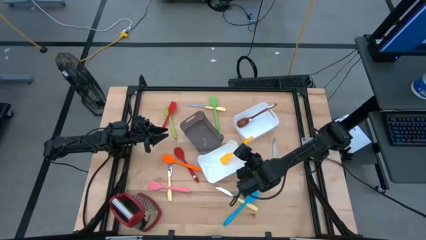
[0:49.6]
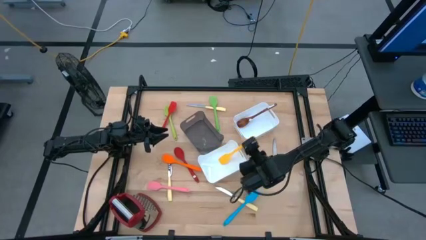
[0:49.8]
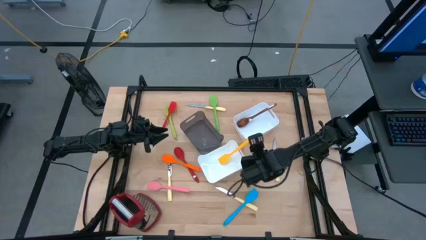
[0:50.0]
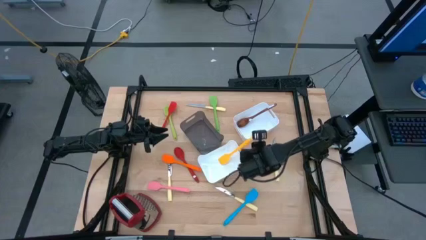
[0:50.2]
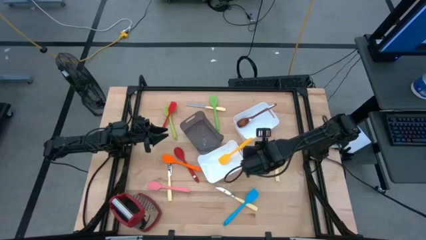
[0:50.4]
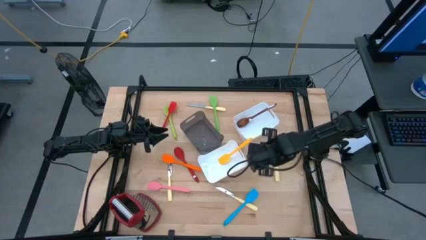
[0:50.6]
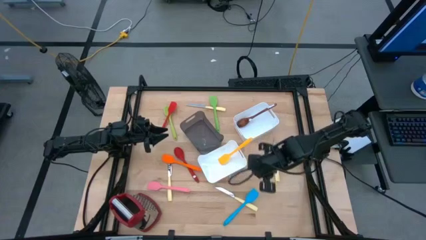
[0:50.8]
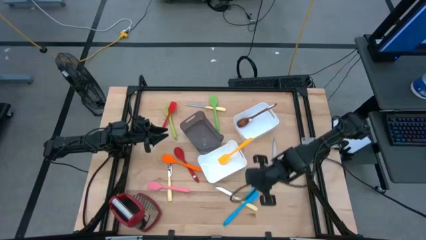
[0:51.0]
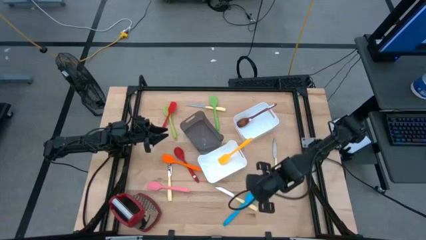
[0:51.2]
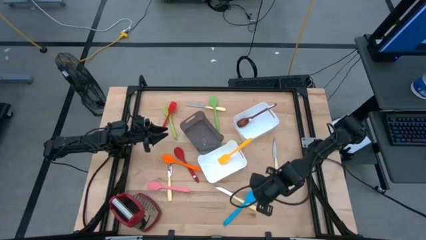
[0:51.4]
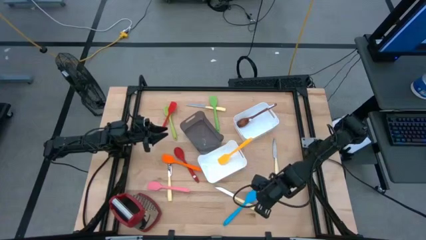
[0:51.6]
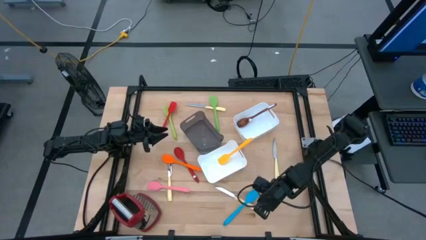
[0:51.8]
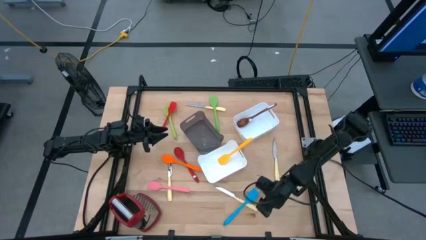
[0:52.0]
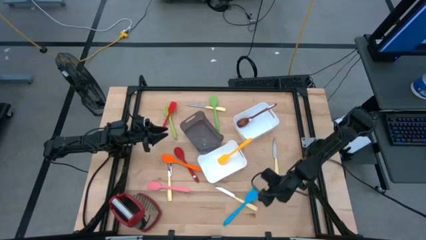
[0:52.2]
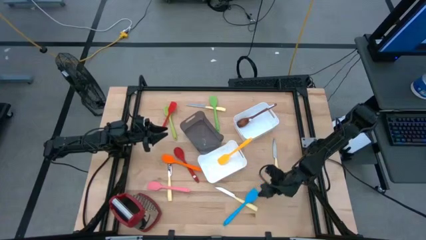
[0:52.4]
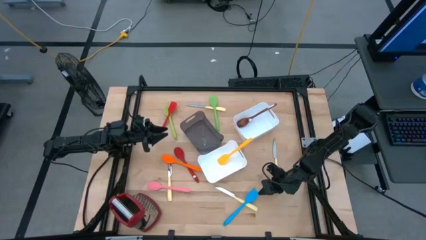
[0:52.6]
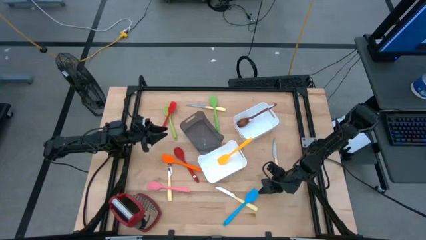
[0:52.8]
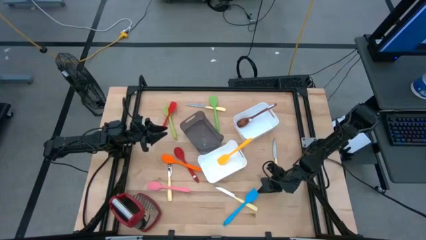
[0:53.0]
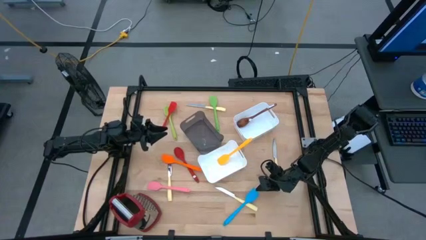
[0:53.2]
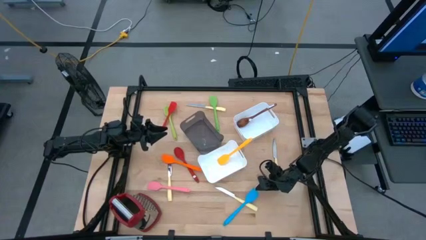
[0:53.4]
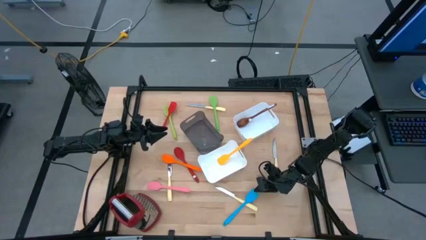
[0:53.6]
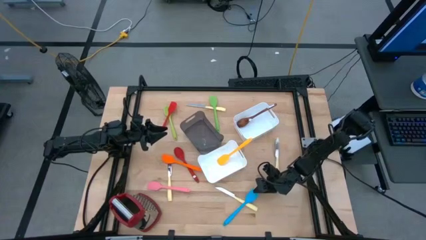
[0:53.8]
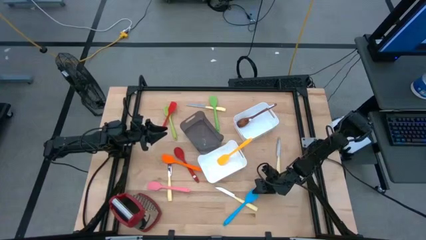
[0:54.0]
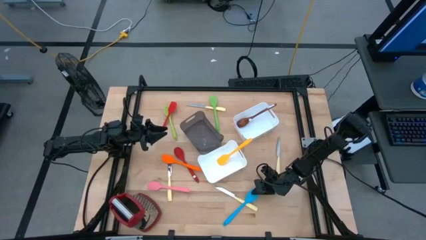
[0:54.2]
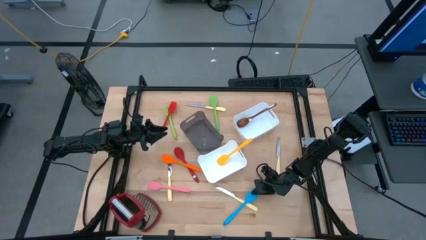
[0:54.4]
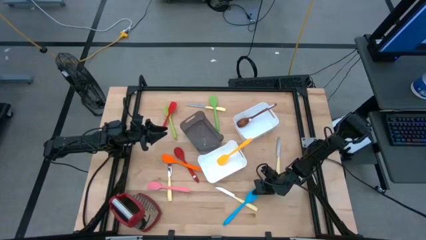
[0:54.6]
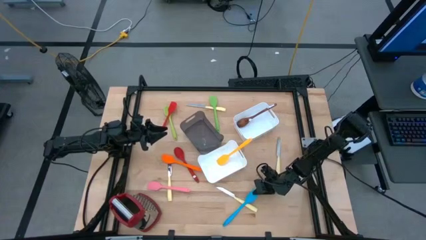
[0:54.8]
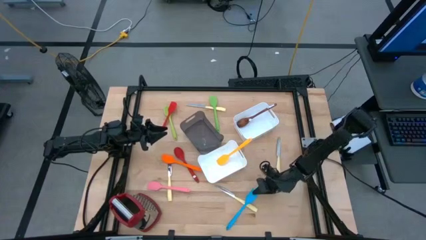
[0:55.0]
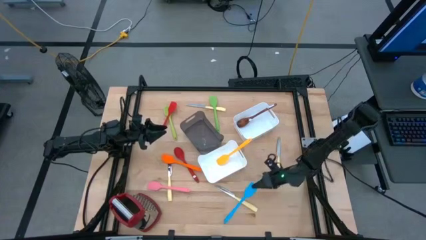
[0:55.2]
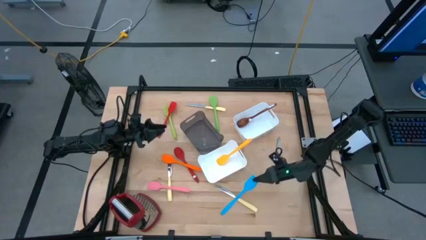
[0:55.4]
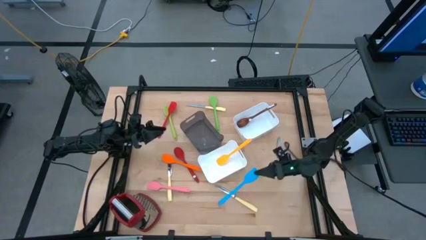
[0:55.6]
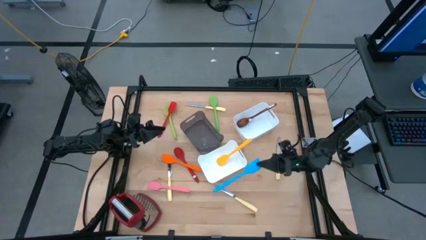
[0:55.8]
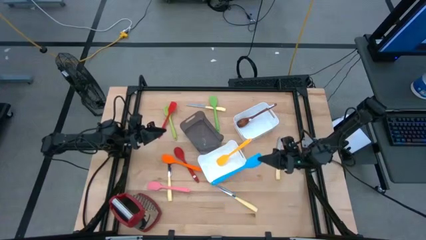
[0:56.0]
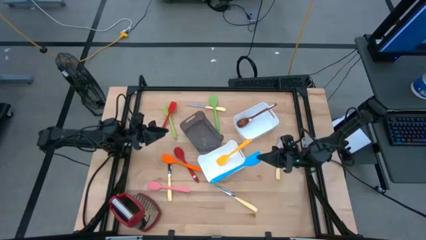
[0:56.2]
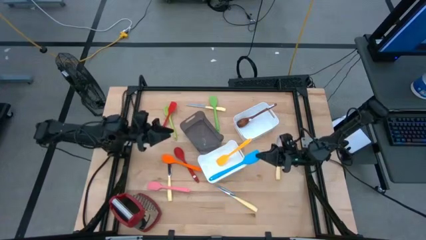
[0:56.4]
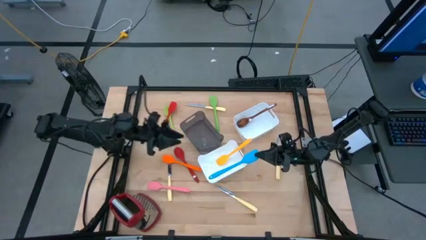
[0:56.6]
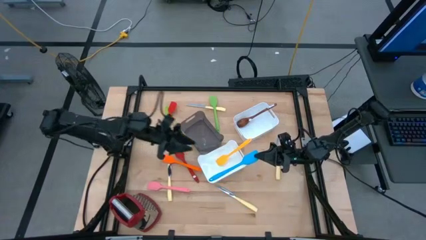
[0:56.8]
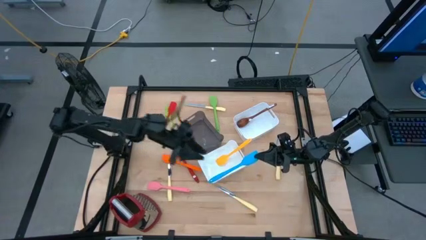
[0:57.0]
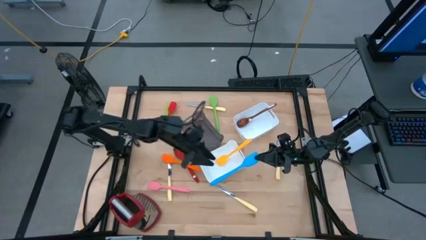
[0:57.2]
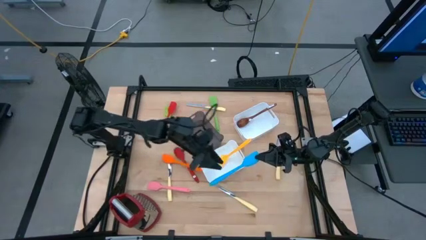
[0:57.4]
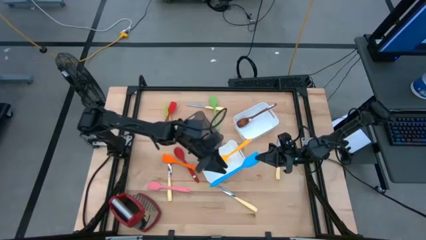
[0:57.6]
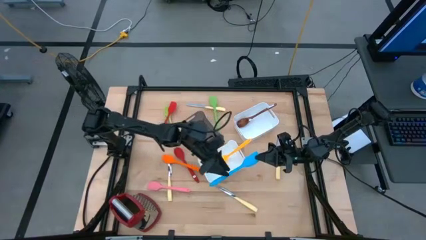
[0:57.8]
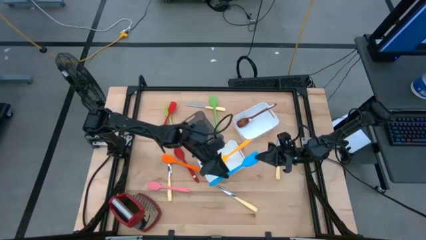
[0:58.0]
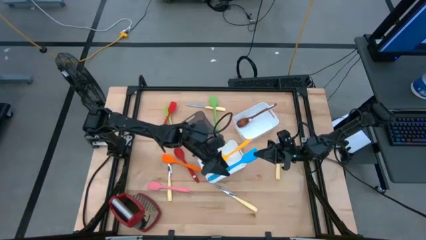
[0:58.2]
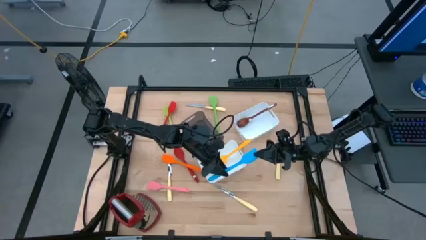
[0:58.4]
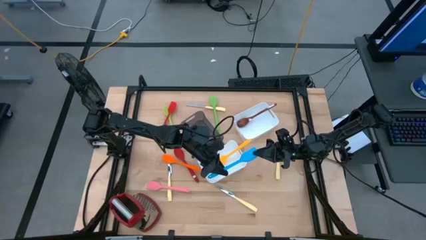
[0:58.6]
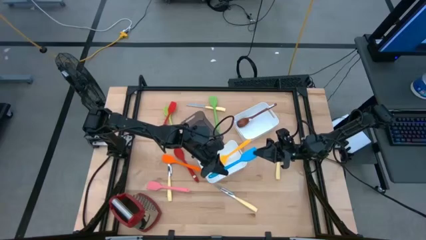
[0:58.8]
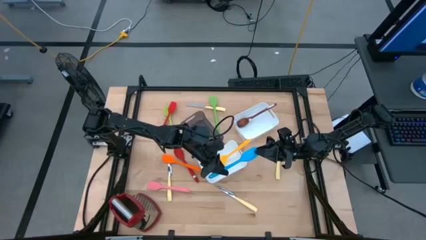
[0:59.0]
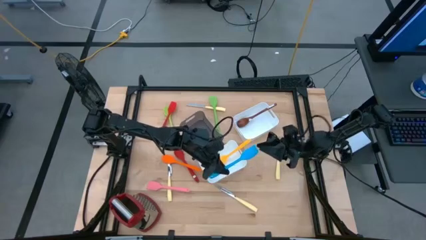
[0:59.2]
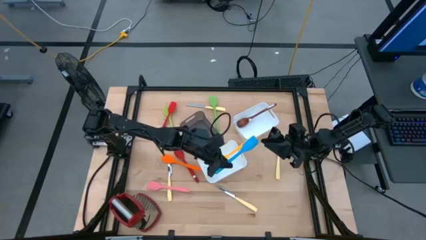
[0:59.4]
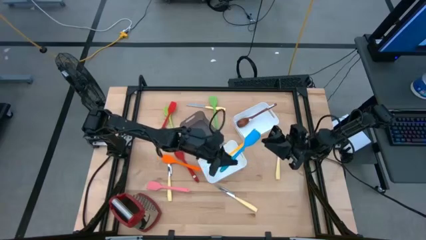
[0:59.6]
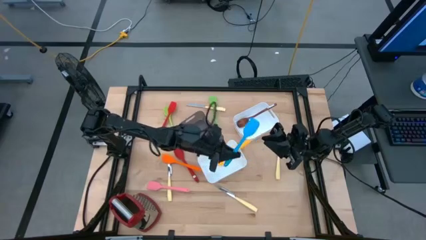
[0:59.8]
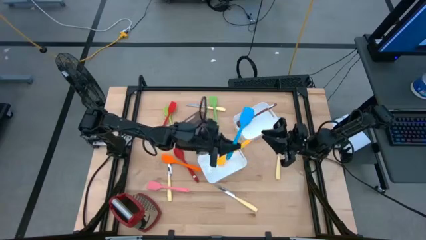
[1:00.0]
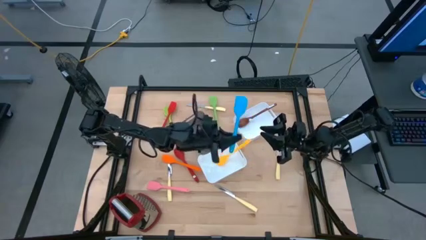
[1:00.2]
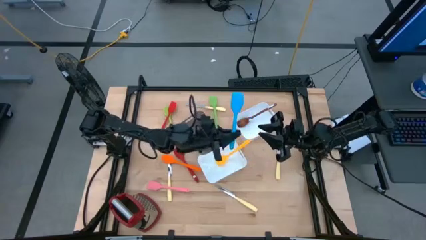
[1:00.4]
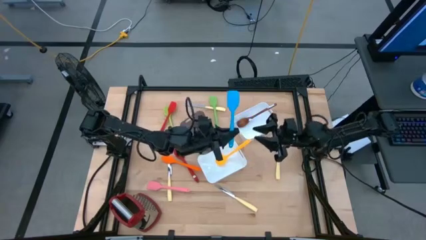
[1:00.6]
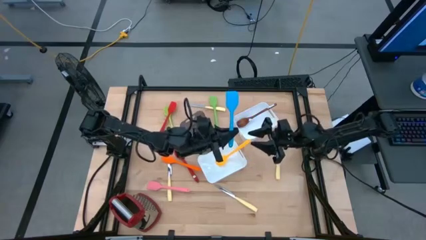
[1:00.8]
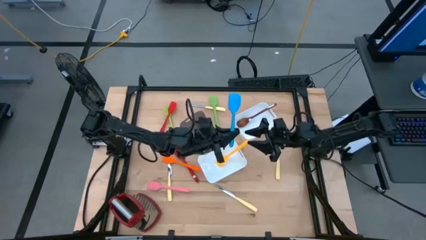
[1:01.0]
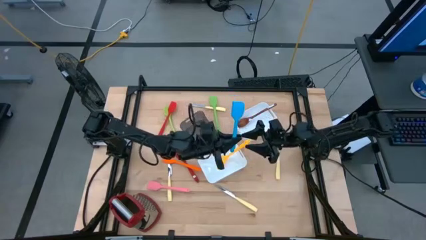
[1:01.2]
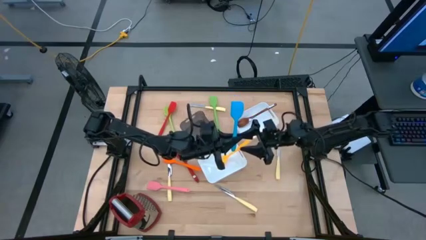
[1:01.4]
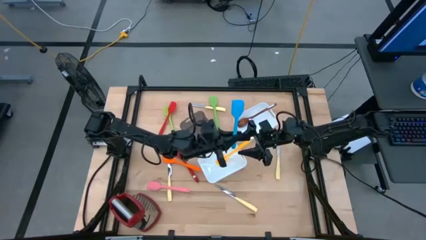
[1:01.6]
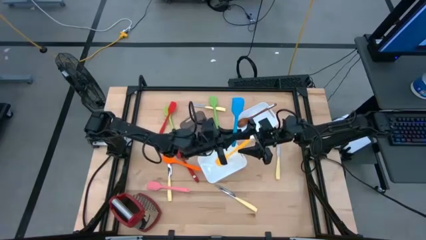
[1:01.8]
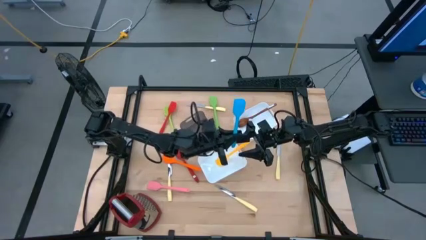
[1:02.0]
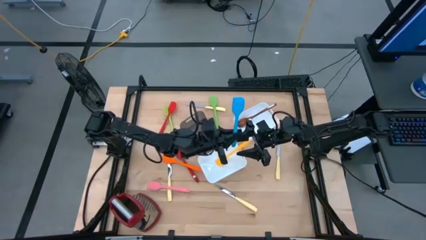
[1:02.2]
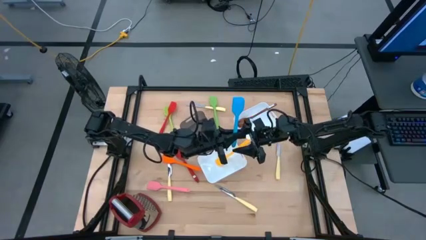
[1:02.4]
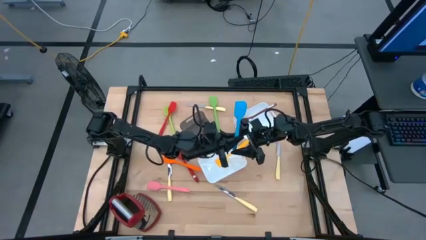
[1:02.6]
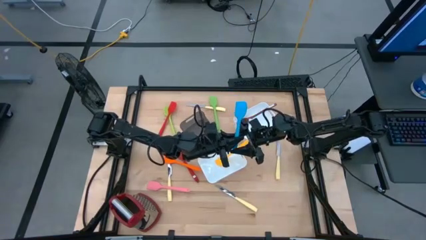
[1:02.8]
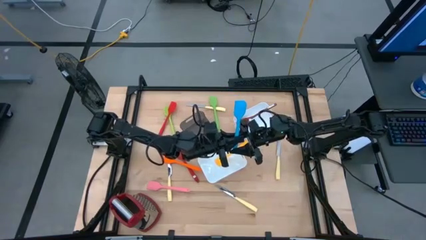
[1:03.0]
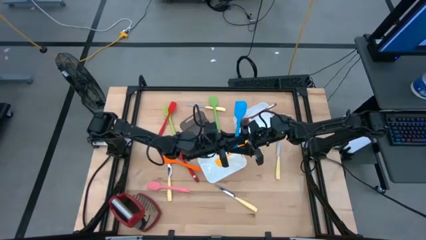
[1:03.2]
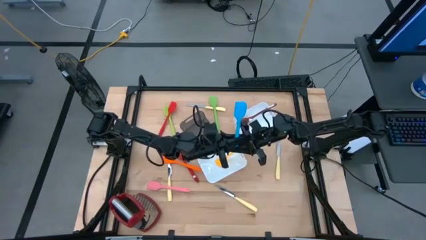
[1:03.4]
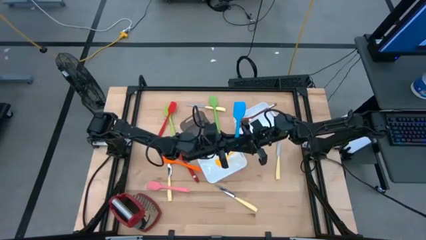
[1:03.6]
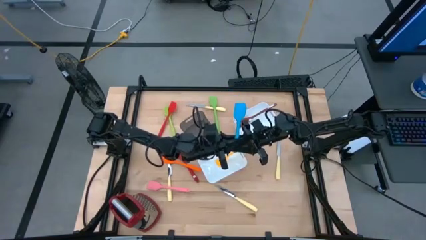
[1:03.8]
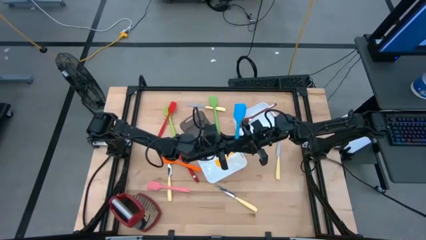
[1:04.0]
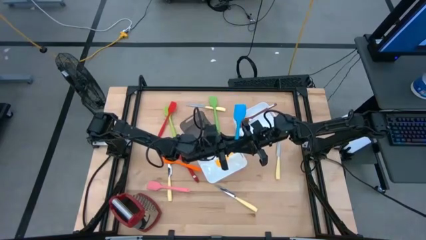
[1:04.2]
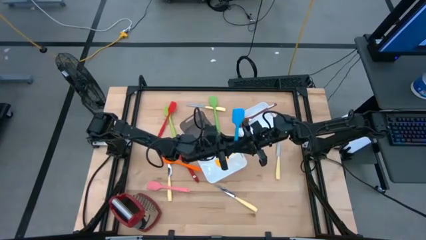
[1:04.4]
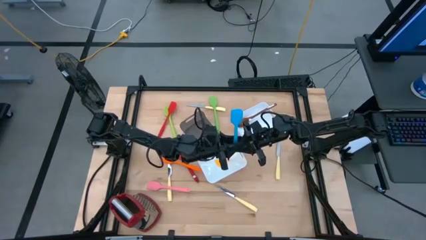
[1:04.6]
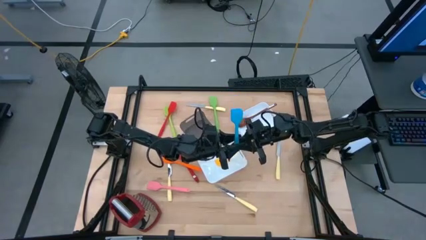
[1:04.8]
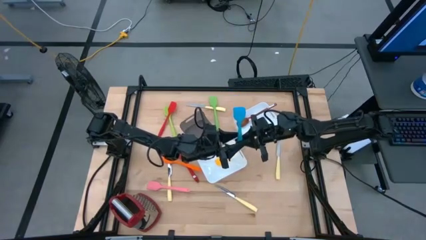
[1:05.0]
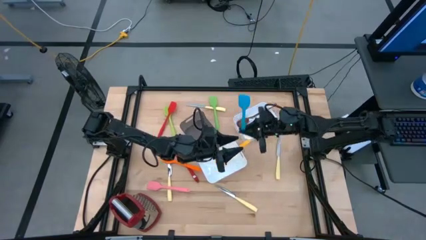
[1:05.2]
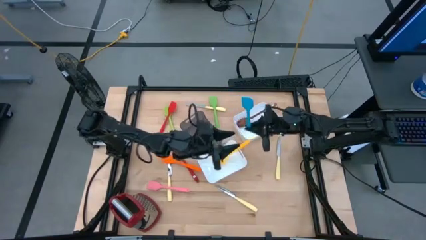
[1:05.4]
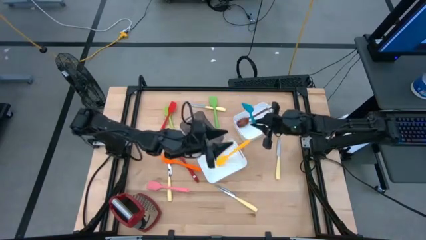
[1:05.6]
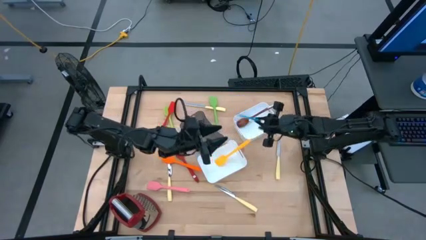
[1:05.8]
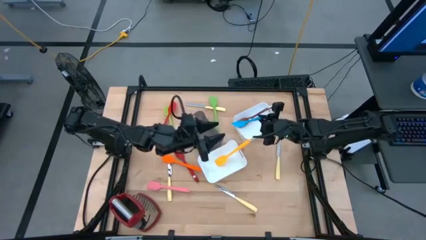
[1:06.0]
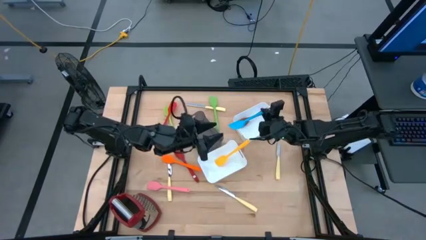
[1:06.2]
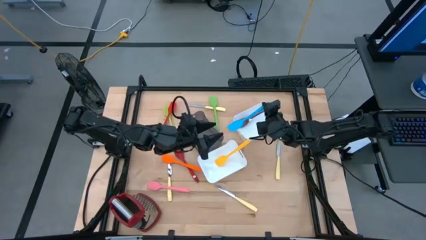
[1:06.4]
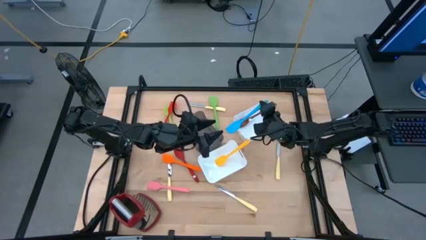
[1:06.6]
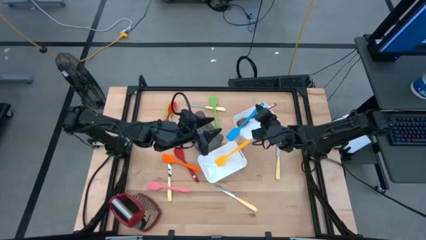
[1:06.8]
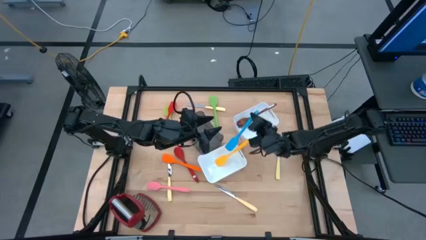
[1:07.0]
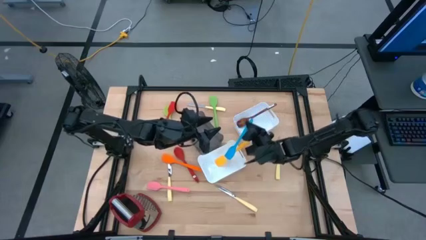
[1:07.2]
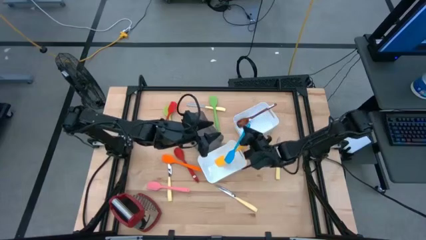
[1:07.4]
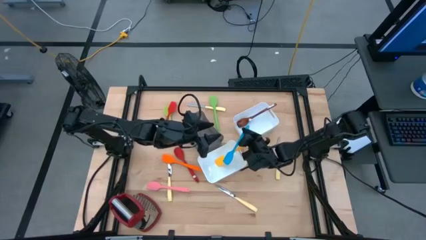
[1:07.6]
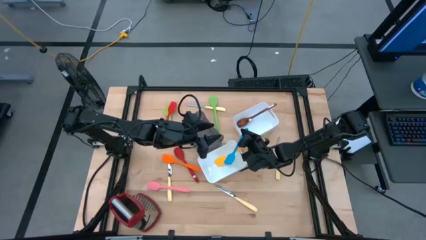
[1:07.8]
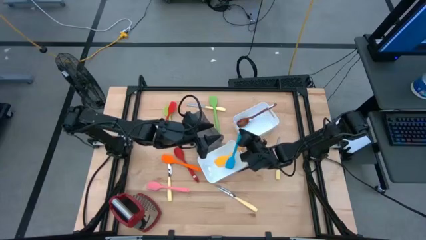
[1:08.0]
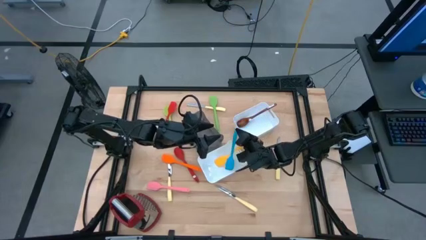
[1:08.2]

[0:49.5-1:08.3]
Task: Pick & Place Kitchen Items
Put the blue spatula into the bottom white bin
